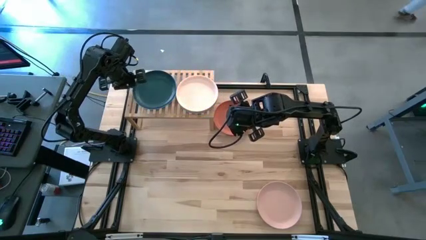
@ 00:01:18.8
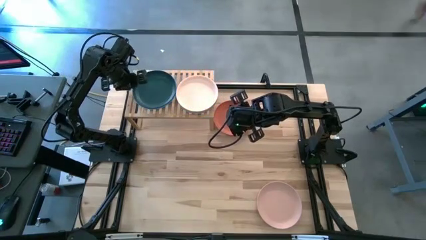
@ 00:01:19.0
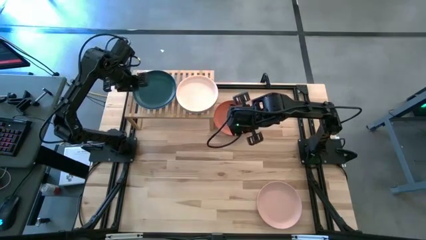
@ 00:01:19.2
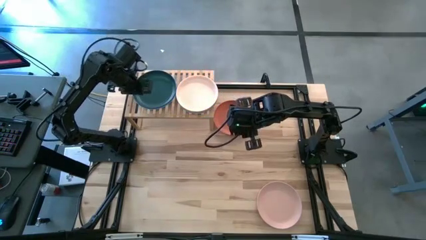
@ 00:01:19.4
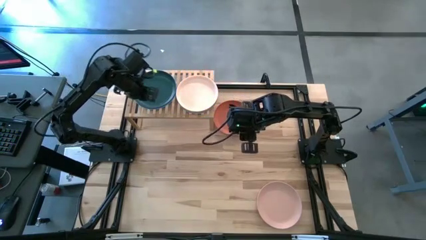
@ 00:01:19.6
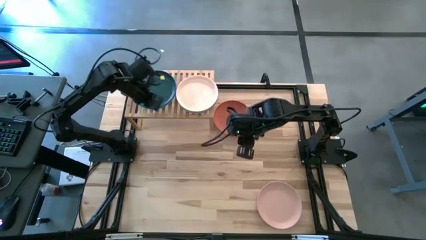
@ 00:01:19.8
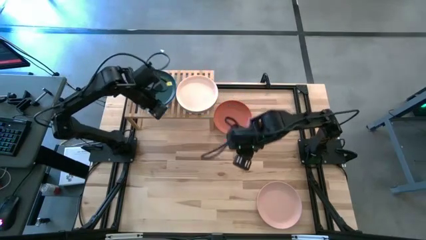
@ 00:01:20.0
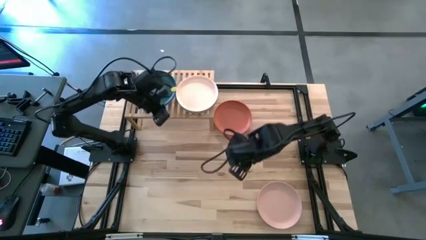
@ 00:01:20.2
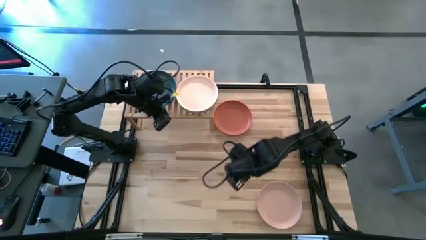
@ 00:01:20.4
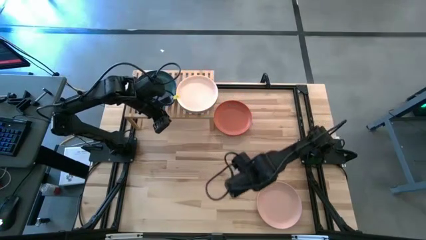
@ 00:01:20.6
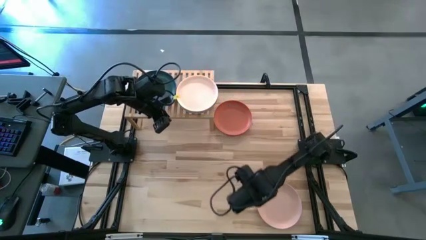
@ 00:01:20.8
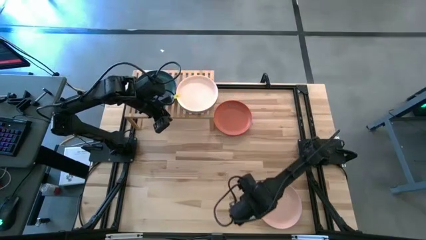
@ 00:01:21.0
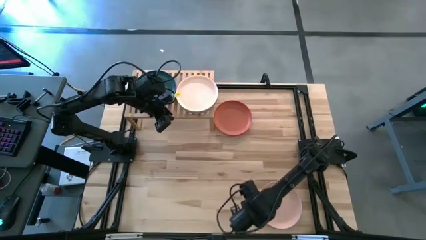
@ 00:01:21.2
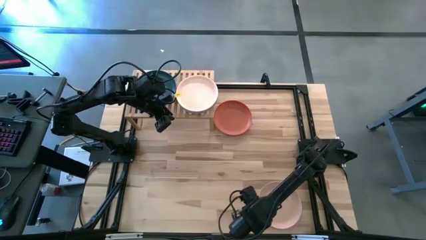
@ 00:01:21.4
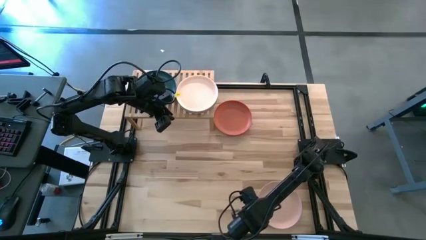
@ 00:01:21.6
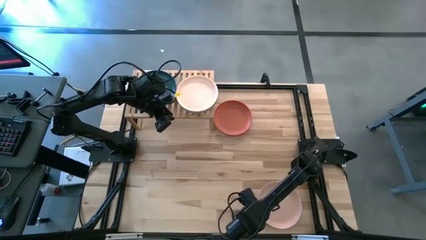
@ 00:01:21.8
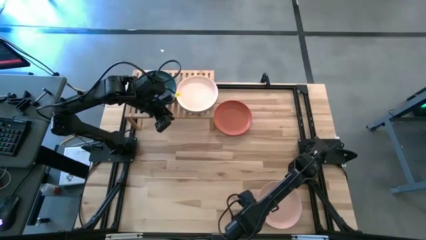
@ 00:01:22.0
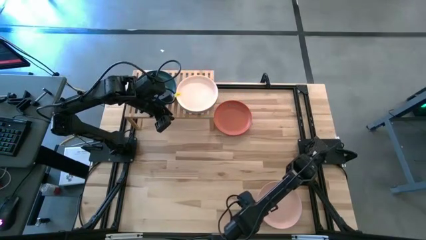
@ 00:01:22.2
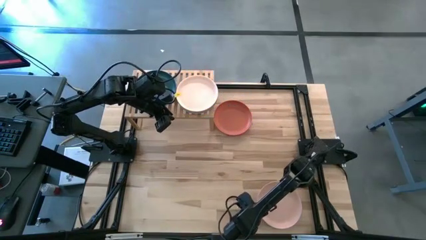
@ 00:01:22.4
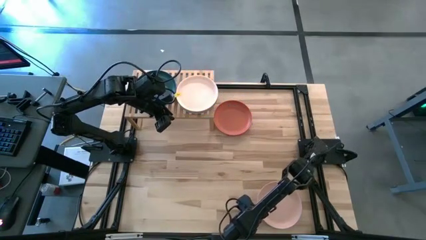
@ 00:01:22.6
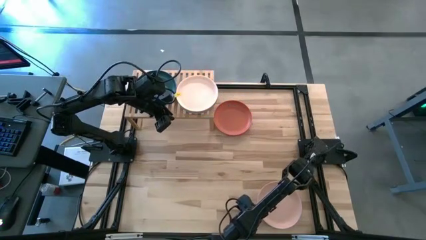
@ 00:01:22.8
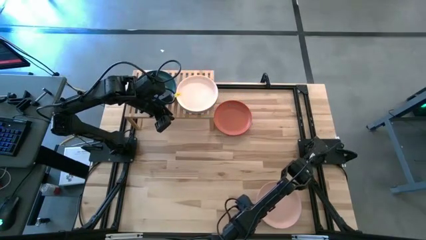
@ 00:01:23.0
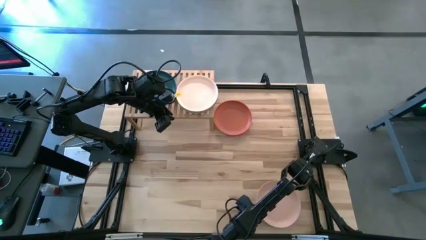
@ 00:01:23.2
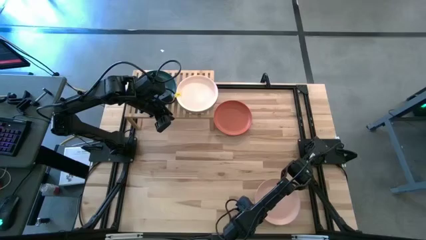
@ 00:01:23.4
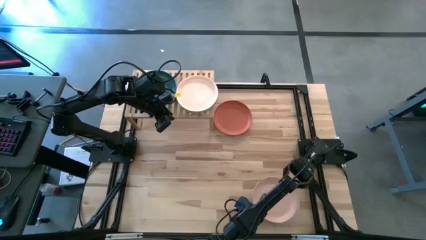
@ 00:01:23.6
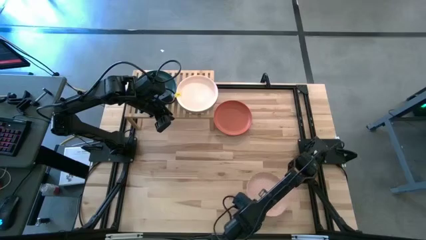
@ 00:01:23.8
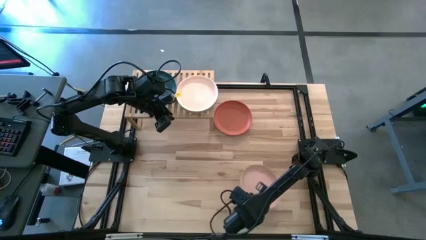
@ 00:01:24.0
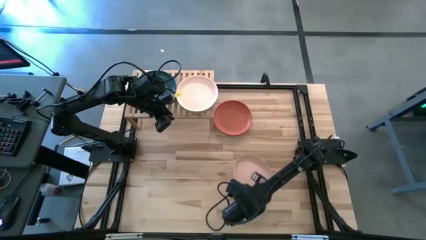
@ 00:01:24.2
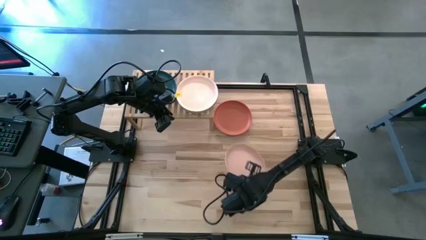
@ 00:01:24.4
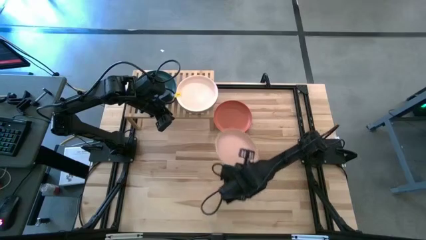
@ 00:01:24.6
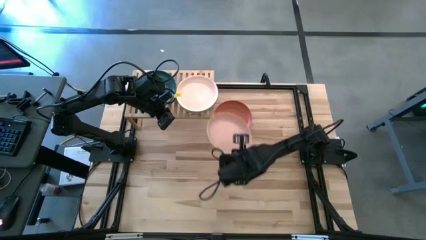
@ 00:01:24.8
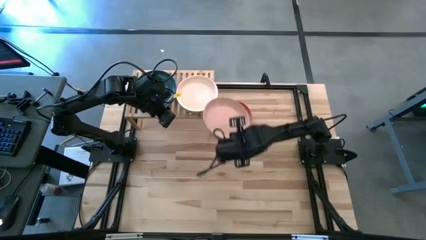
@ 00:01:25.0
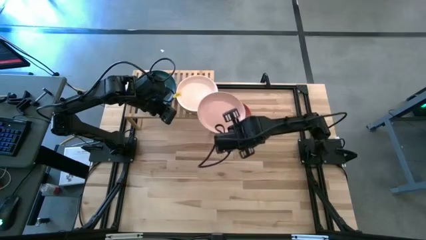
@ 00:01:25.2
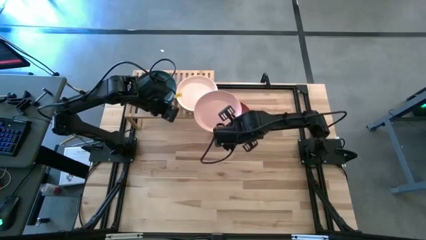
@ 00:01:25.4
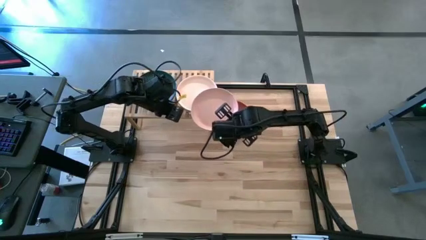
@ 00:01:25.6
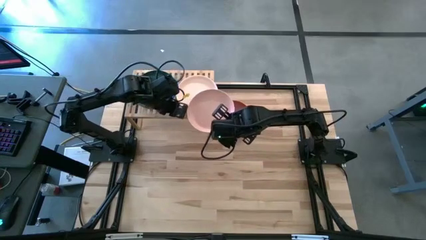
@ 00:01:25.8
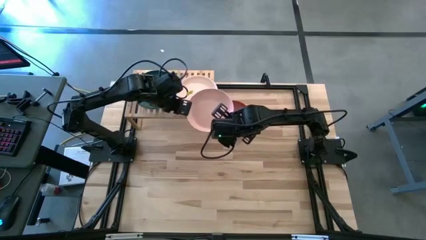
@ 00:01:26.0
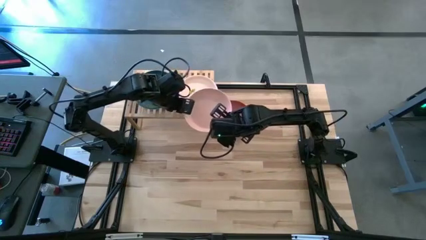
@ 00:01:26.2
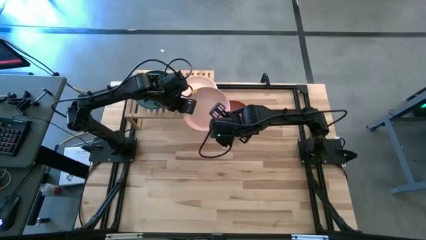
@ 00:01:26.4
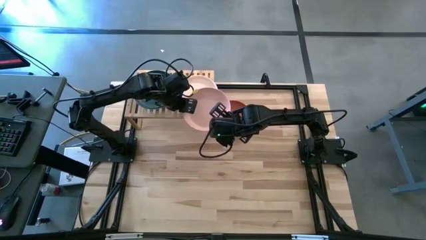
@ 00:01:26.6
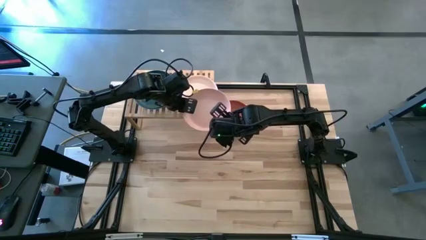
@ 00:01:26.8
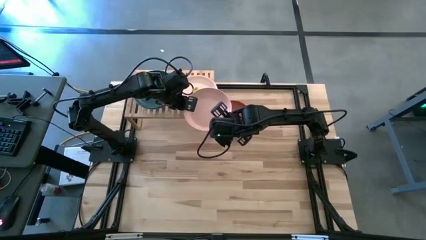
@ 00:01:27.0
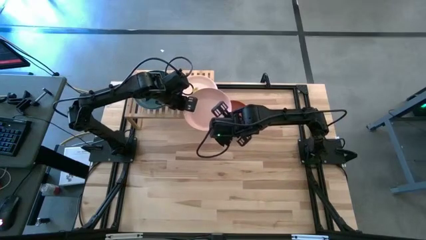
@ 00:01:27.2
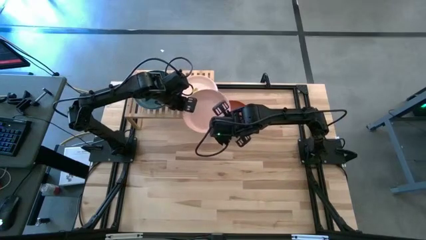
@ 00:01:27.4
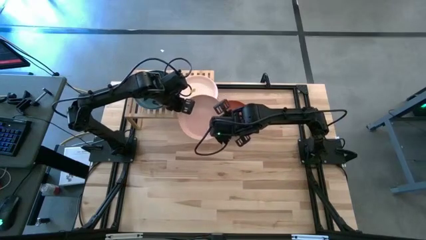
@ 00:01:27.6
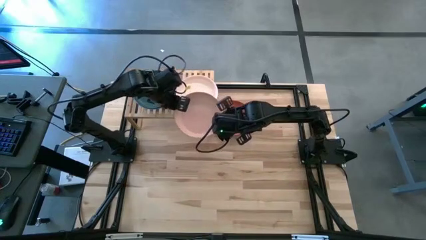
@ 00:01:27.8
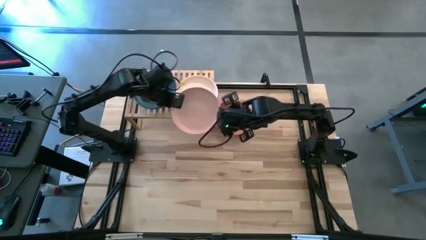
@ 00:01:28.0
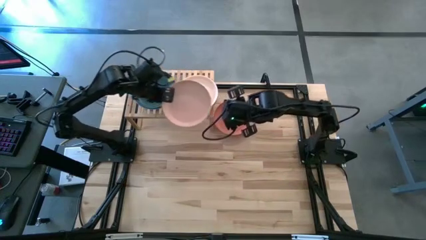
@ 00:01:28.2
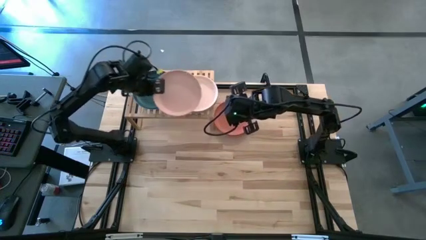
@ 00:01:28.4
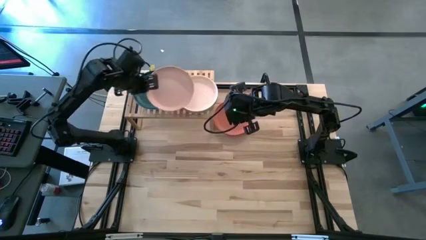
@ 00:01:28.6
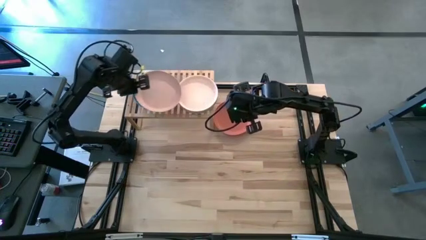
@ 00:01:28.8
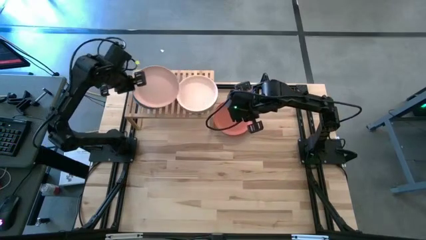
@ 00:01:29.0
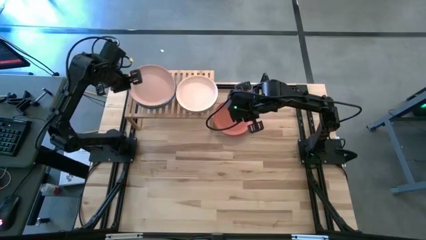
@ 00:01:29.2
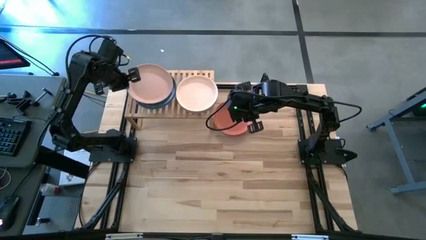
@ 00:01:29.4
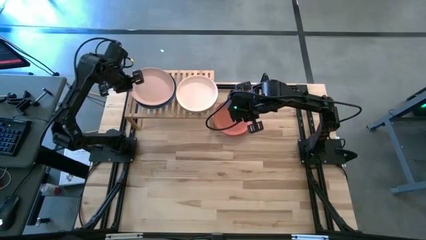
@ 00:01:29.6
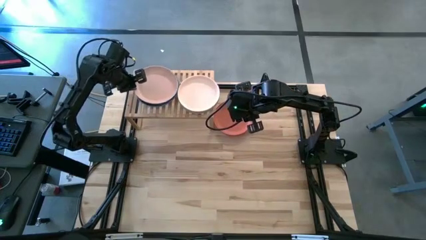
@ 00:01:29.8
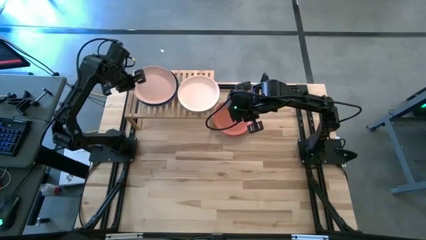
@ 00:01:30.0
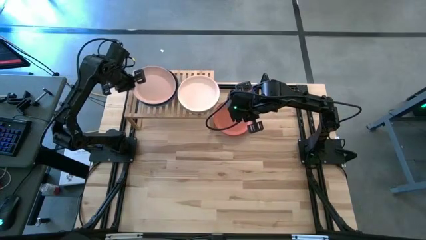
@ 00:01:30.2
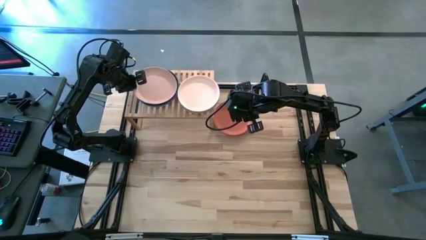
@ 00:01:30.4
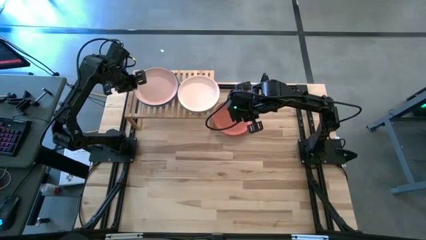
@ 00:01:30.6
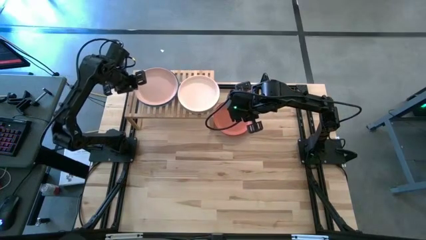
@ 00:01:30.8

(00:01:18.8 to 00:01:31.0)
Task: Place and stack plates onto a shelf
Stack the light pink plate on top of the black plate on the shelf

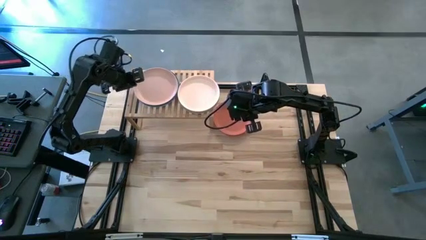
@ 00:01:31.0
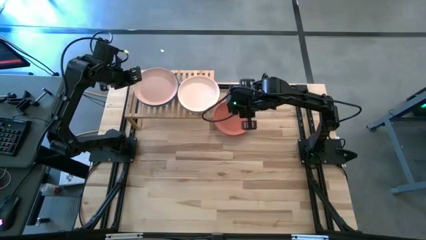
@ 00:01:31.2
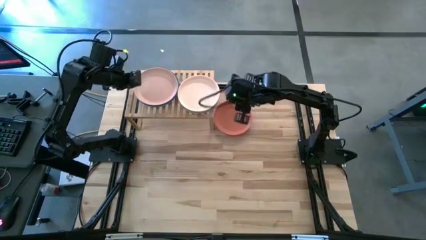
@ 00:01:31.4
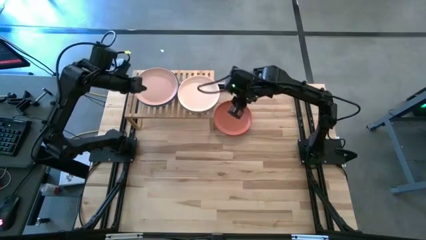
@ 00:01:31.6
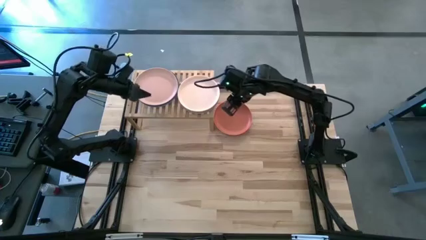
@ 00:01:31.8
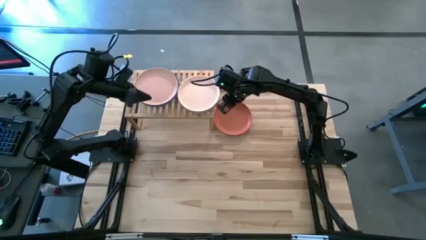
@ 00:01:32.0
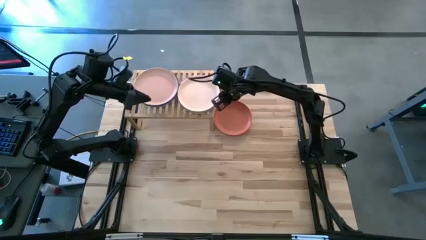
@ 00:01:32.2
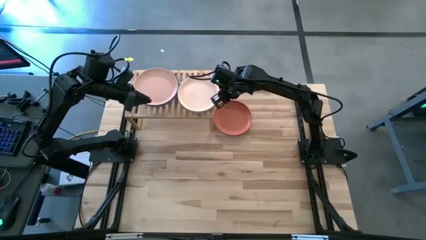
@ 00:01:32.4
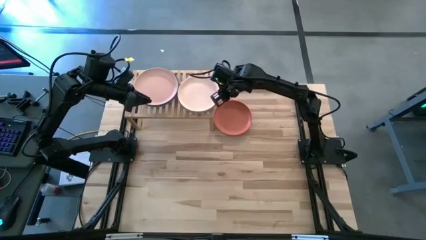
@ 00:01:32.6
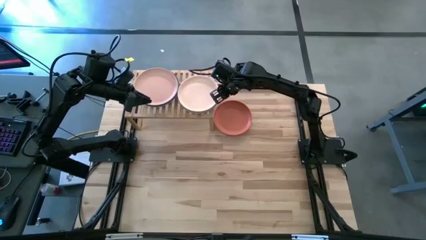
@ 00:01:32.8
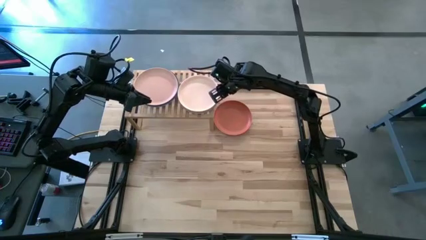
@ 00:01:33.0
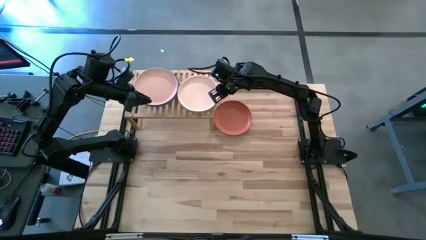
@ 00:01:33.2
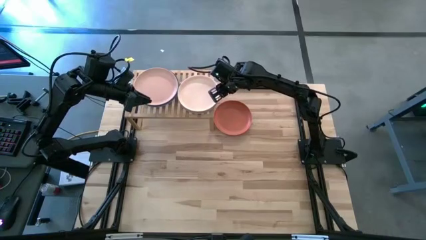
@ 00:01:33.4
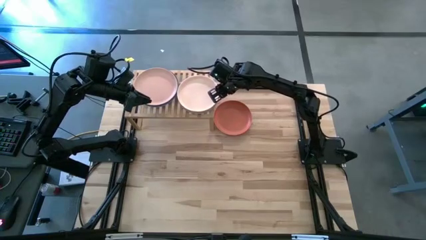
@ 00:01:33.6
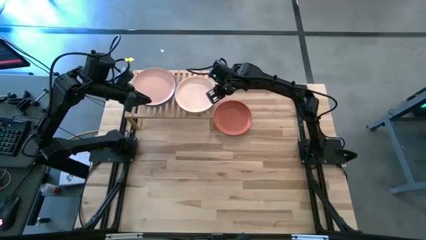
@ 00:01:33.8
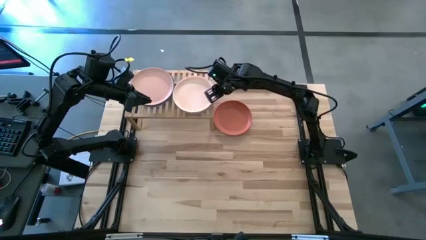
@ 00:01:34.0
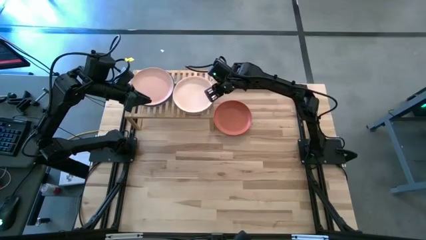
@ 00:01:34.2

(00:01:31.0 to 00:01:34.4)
Adjust the plates on the shelf
